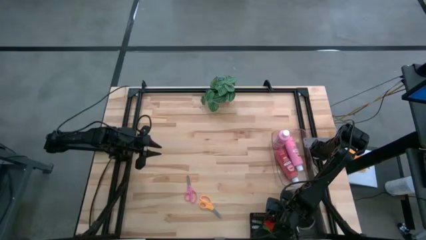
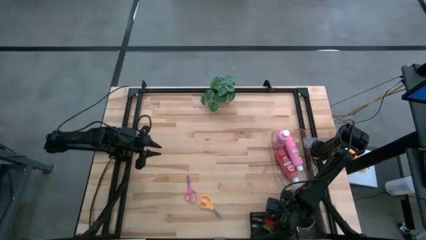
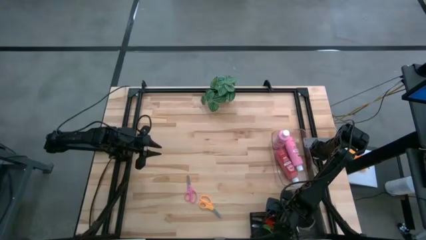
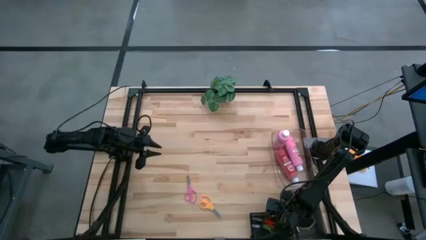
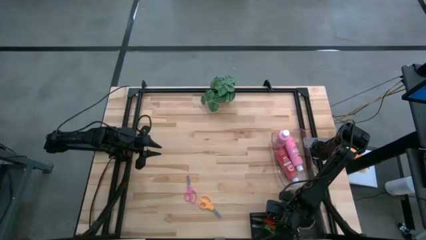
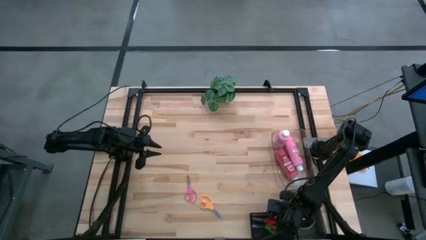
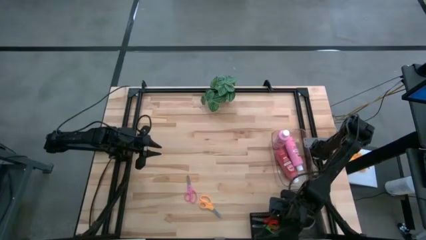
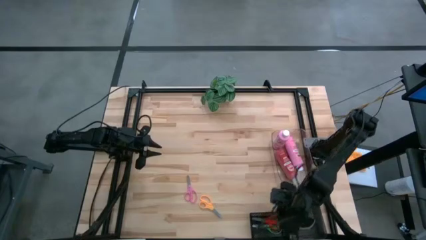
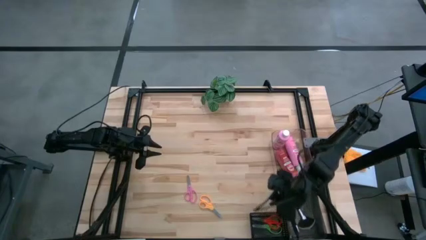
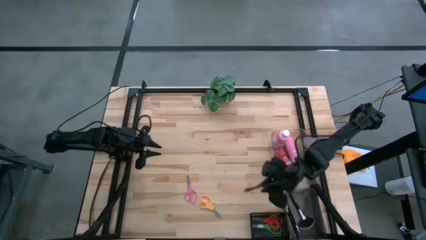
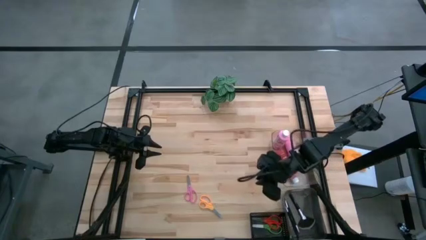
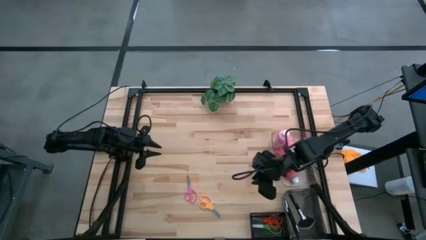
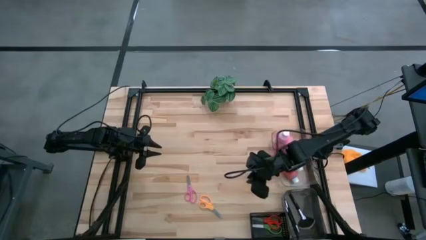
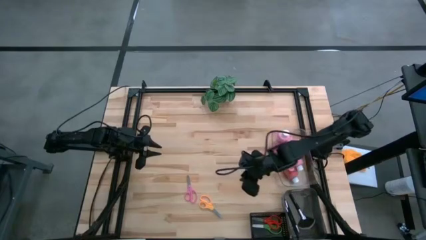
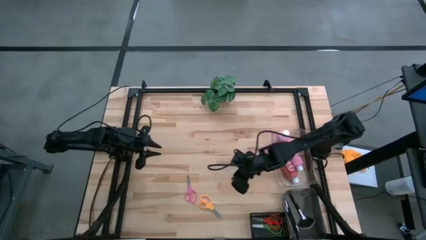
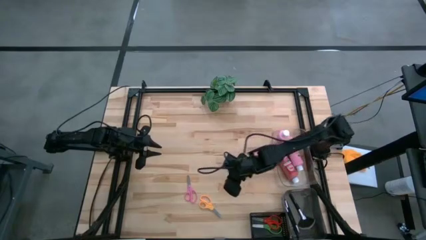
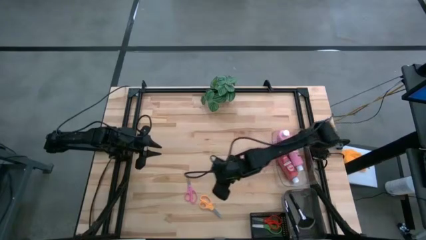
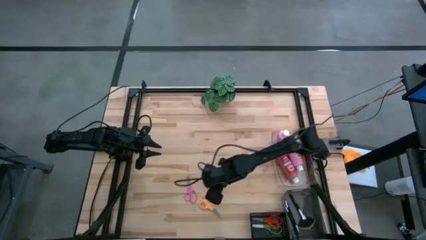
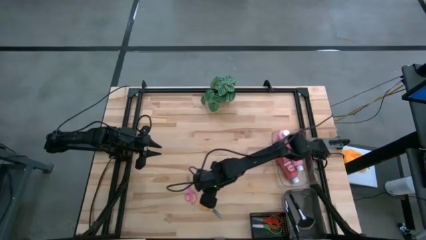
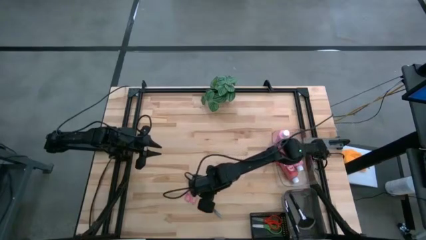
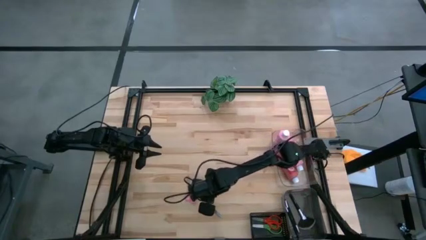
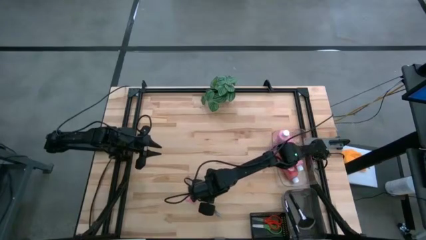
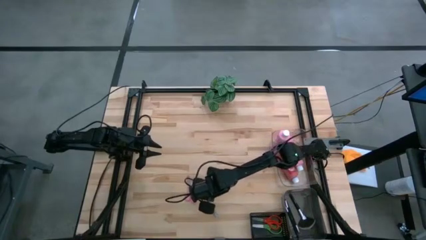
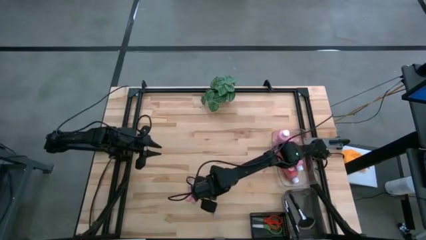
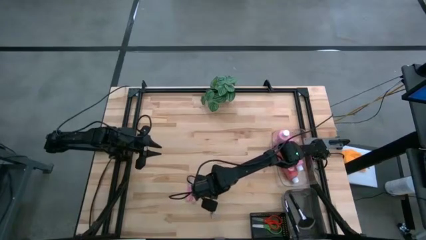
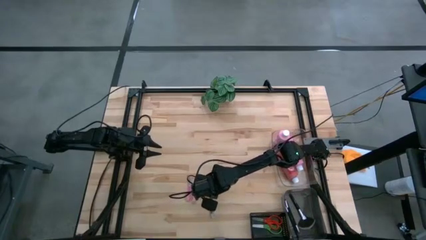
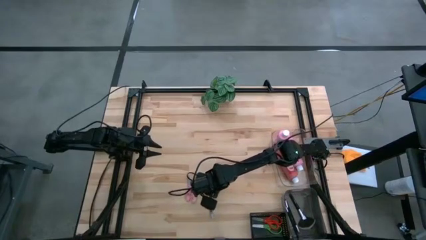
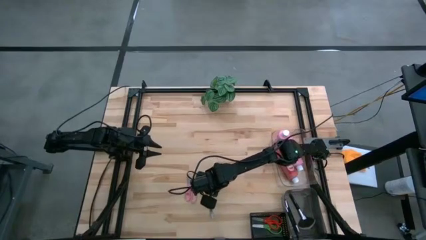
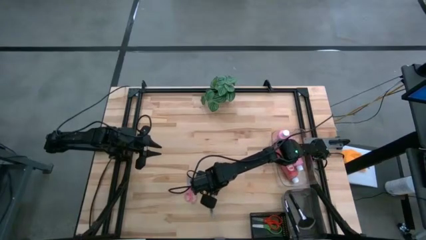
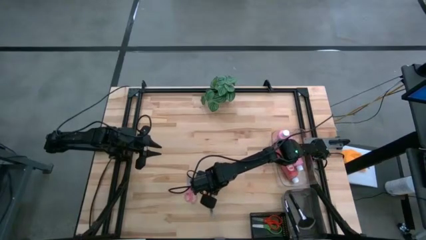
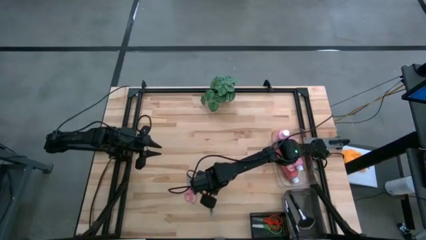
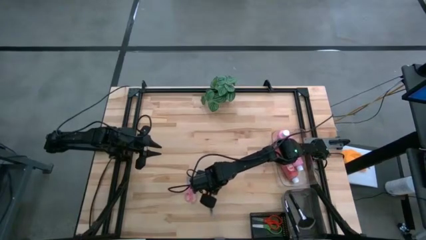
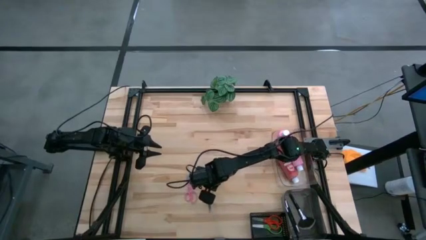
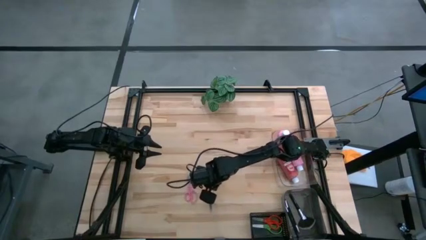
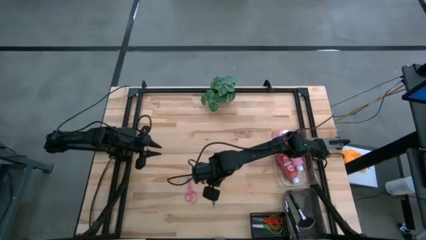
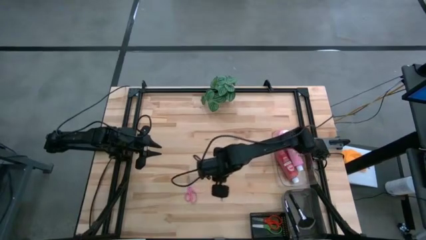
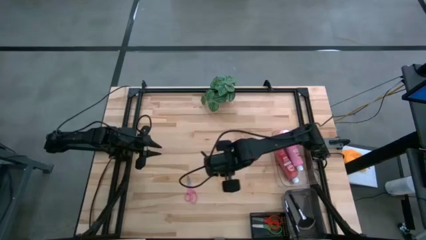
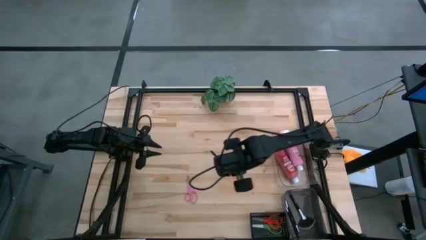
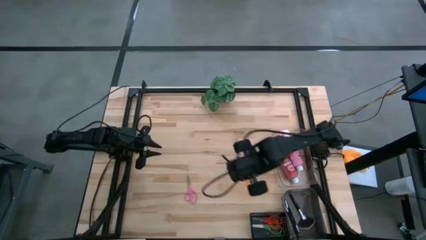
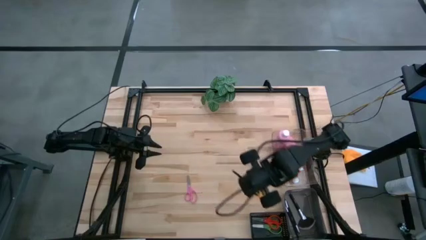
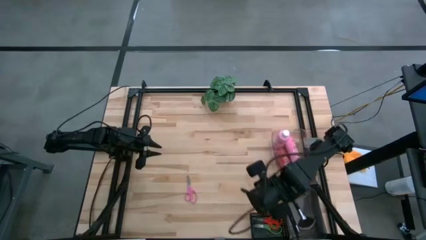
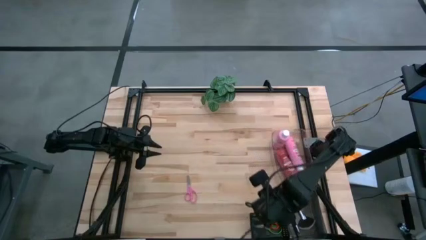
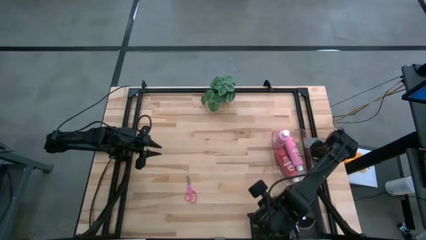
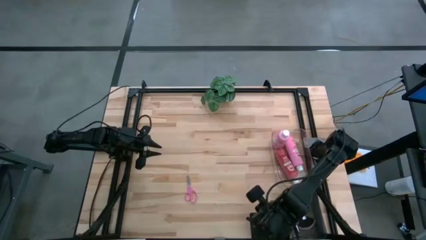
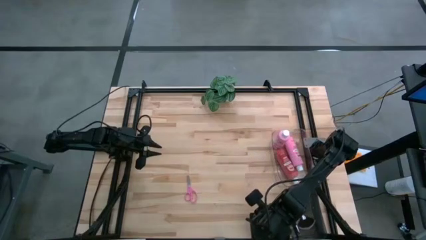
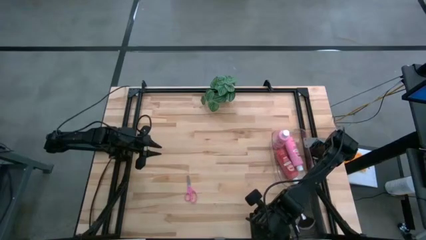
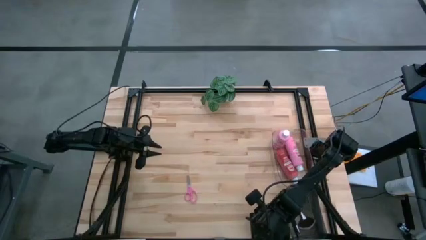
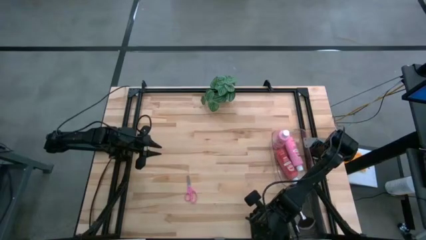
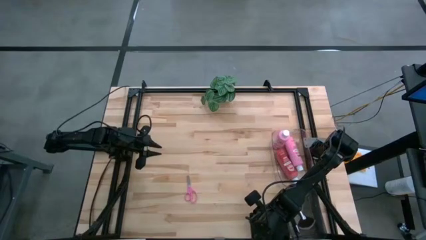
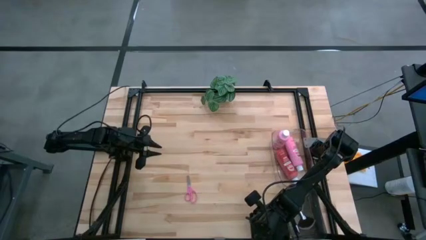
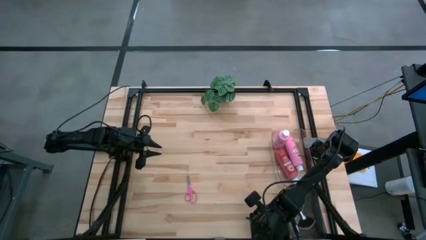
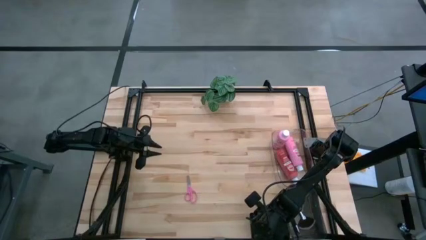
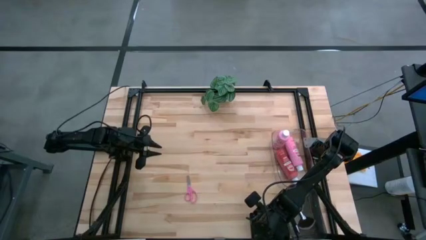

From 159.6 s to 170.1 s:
Task: Pick & Place Paint Supplies
Put the yellow scissors into the black bin
